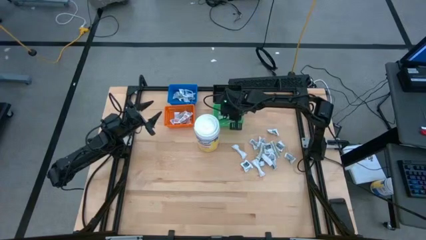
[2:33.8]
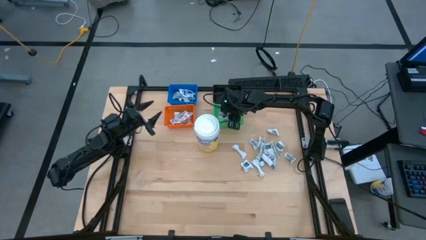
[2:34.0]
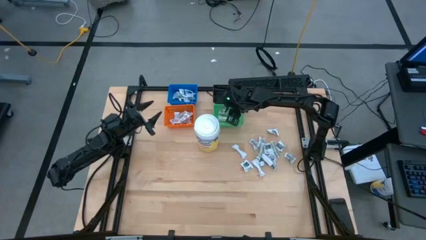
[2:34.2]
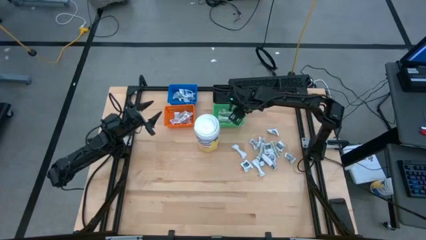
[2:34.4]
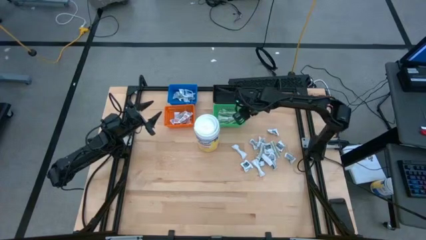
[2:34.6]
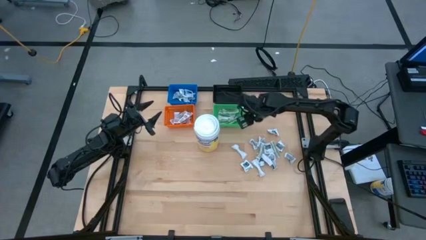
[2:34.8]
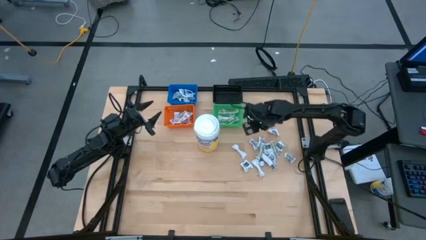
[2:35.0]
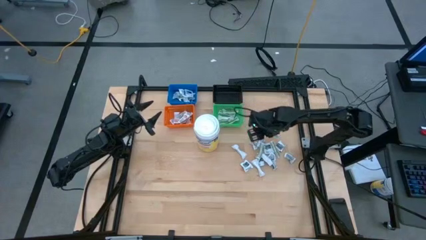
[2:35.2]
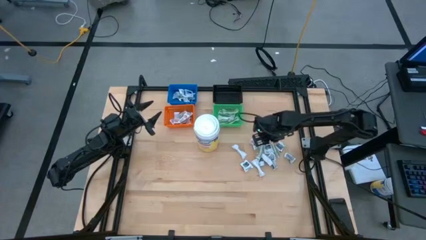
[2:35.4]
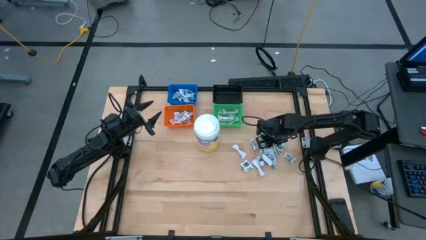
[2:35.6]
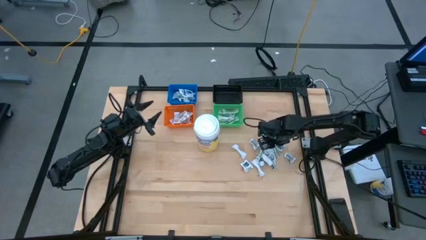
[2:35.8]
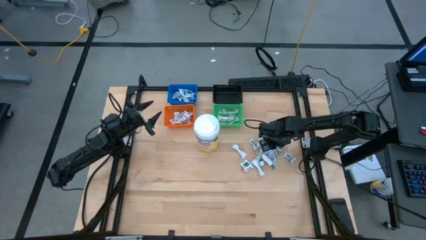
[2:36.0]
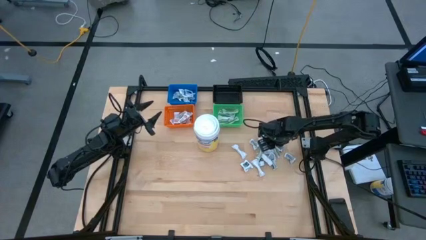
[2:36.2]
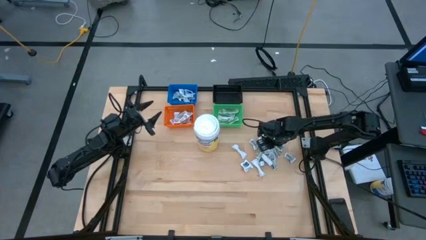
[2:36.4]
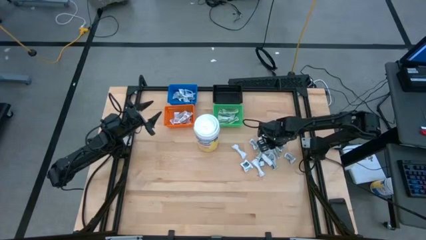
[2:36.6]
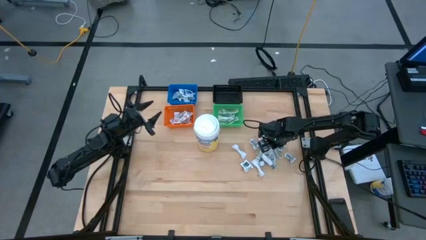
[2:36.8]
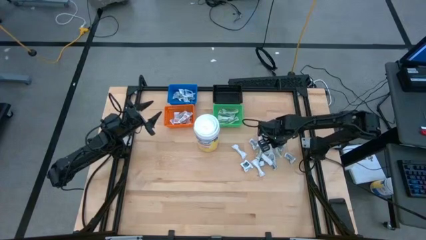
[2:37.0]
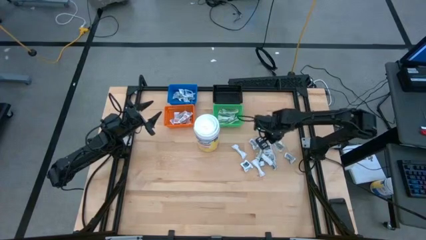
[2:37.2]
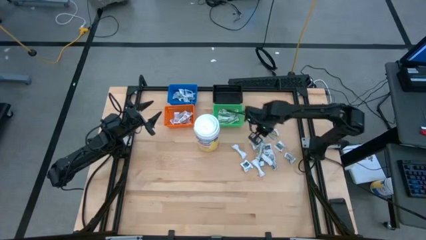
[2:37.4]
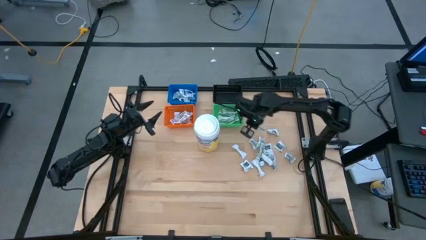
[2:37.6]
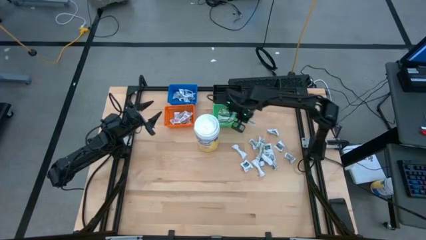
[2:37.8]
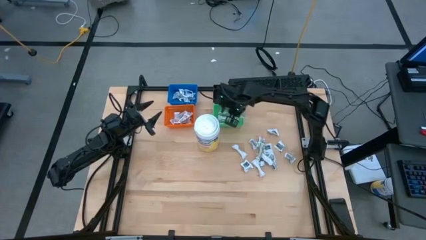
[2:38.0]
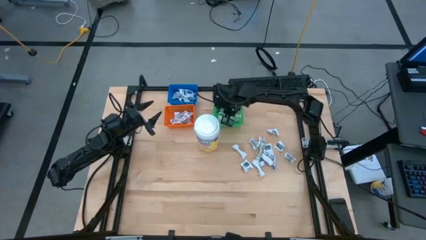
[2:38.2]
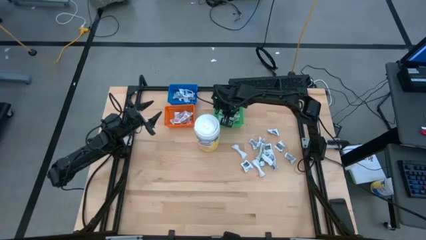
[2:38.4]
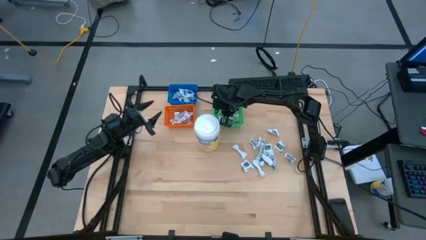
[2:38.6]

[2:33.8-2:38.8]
Task: Pick & Place First Aid Supplies
Put the green bandage into the green bin

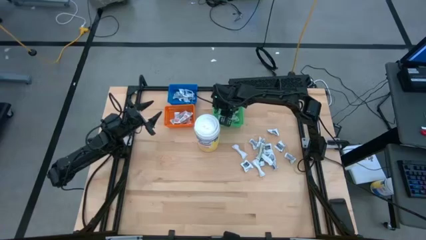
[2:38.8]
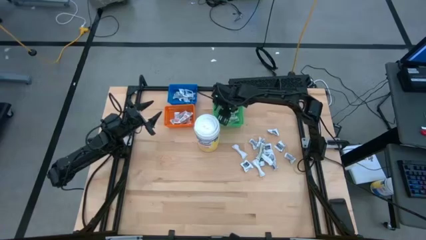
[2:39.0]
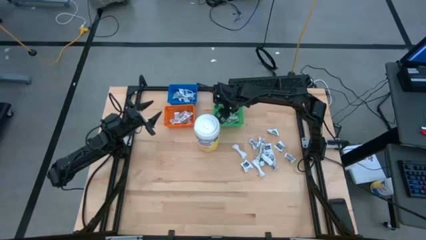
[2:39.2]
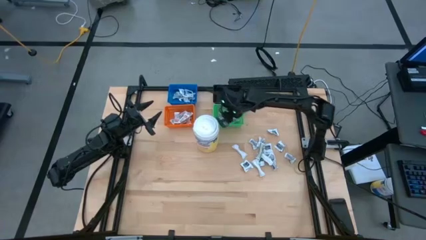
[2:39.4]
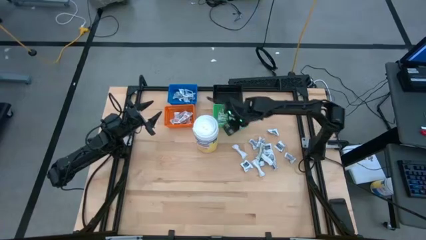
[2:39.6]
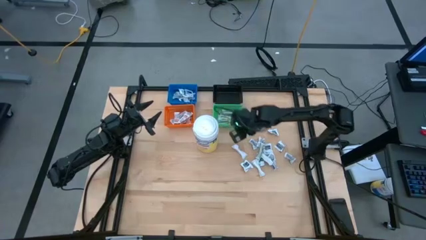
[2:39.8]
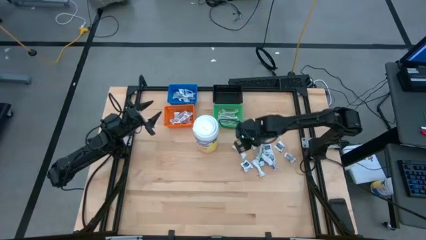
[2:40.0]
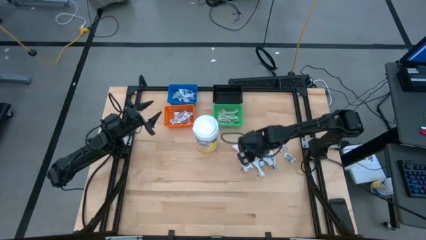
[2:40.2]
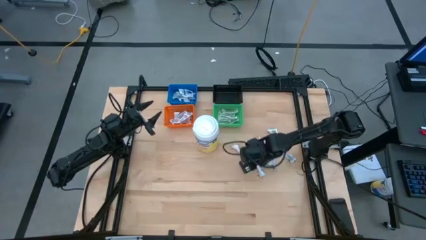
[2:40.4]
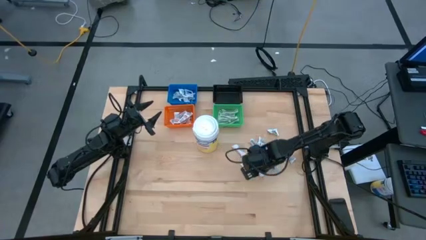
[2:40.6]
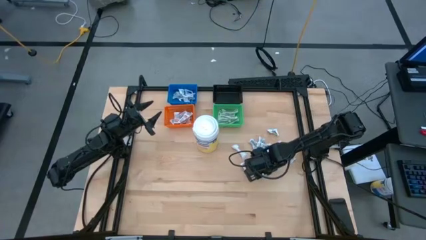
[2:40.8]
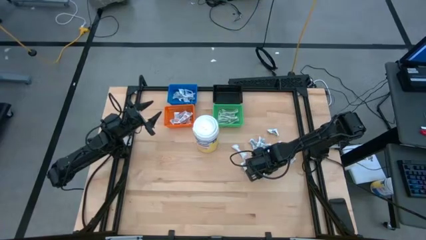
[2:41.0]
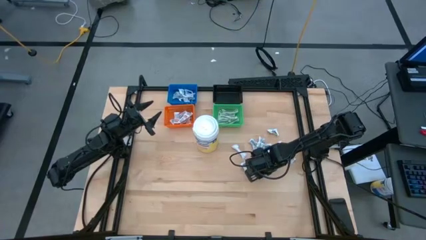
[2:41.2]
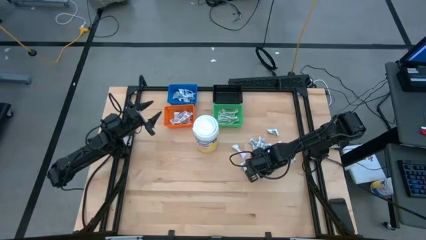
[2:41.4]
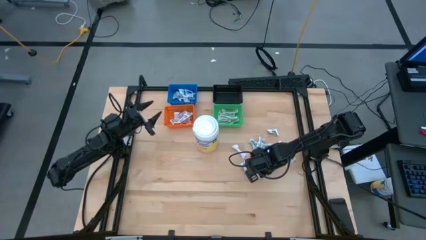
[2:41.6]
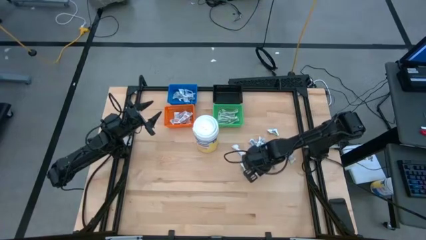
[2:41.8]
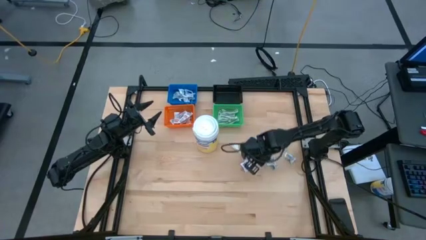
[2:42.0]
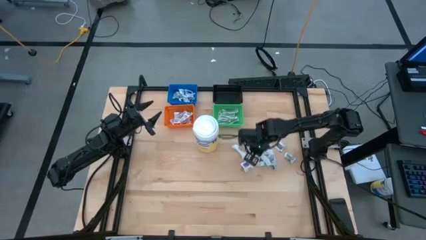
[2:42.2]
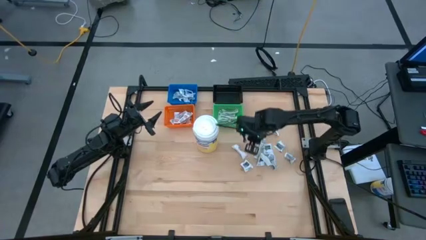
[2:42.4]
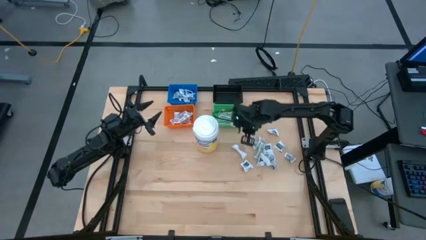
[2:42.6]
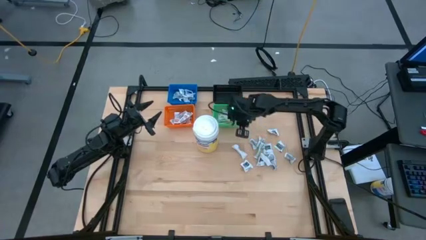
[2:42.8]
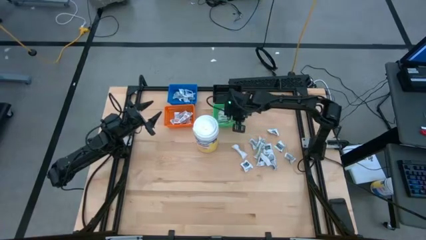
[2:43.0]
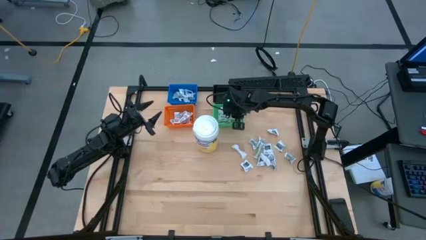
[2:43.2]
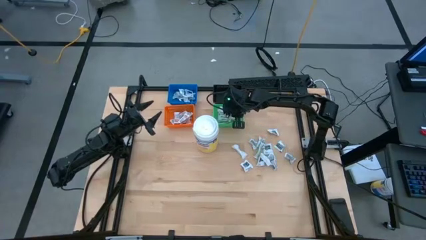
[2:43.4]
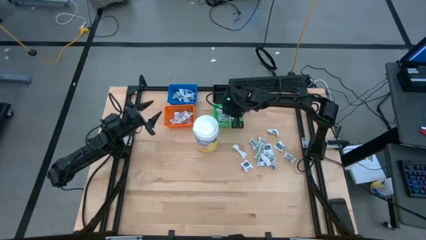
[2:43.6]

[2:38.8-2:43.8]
Put the green bandage into the green bin

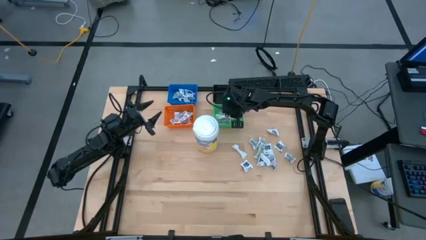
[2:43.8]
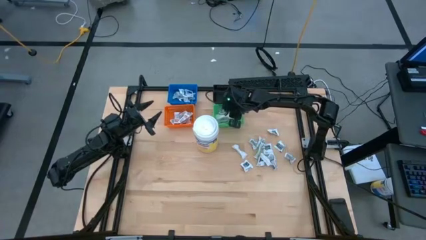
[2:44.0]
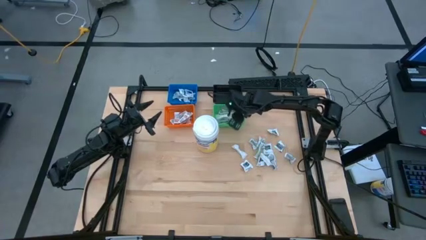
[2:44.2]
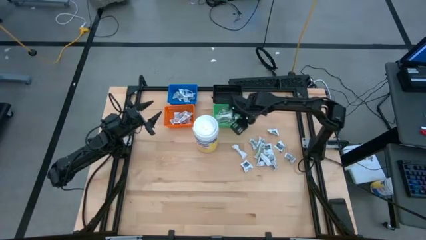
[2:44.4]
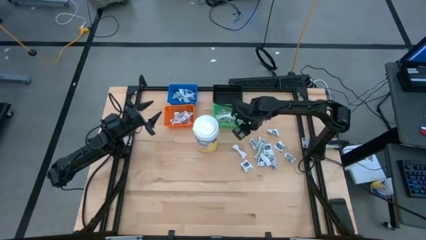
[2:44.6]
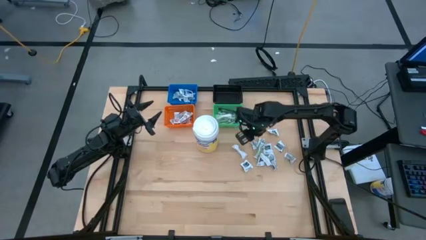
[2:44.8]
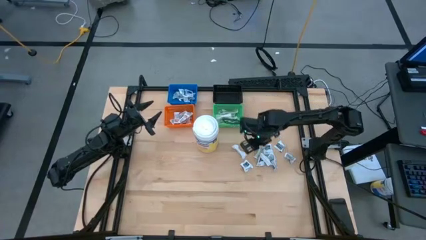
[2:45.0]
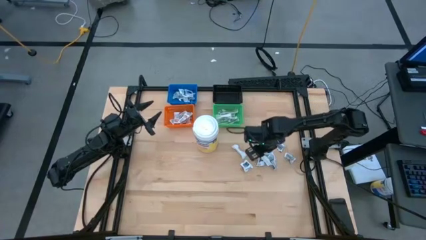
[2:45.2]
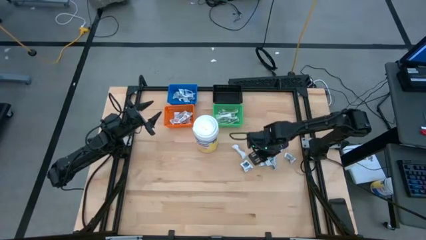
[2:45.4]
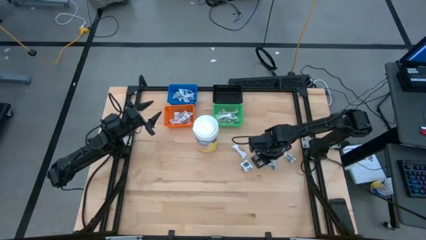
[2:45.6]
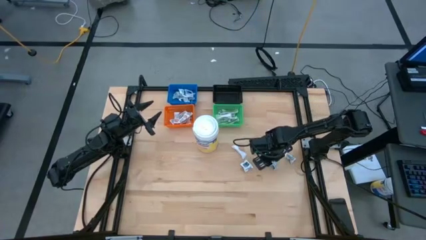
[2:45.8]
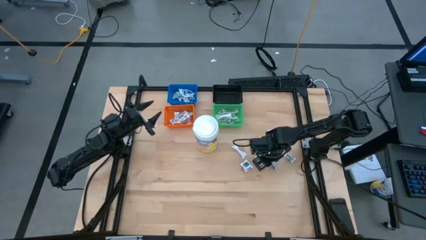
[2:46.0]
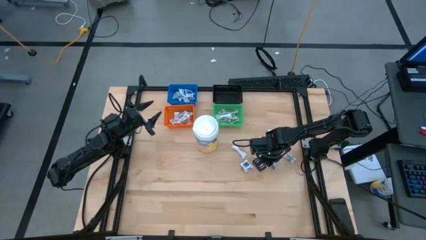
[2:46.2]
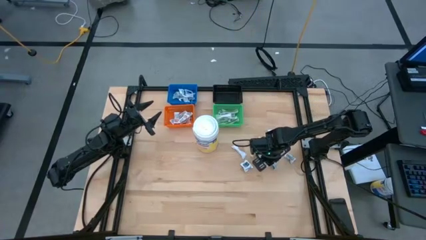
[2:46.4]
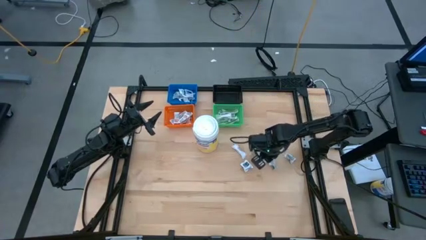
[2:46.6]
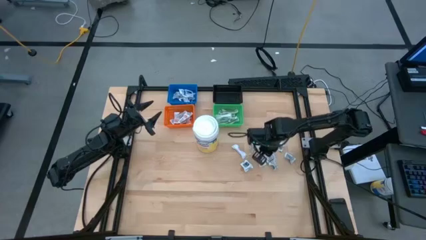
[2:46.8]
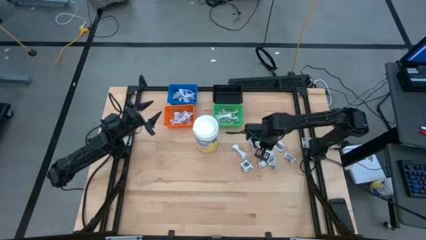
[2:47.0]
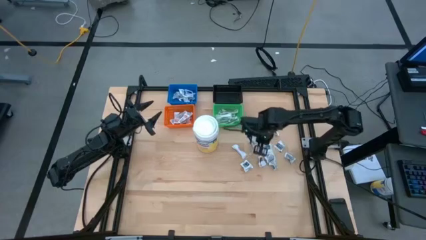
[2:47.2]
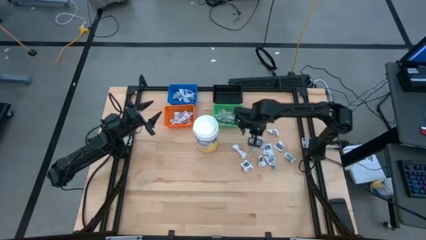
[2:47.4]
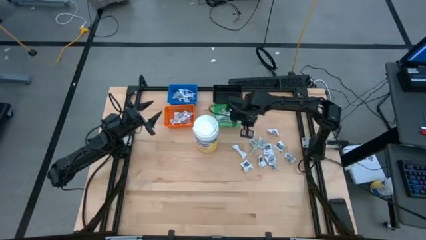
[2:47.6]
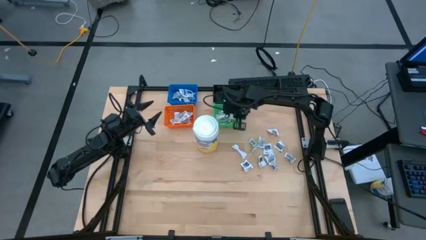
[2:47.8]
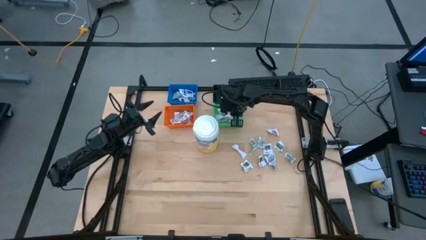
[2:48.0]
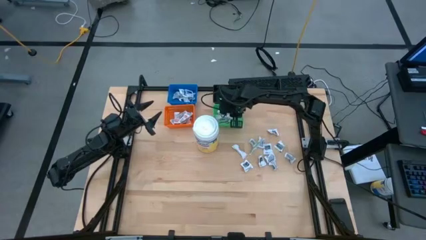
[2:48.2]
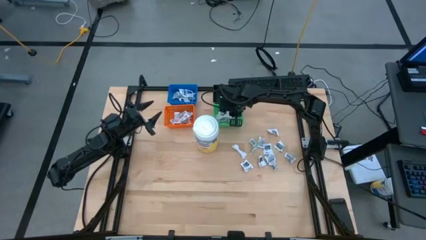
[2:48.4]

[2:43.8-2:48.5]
Put the green bandage into the green bin

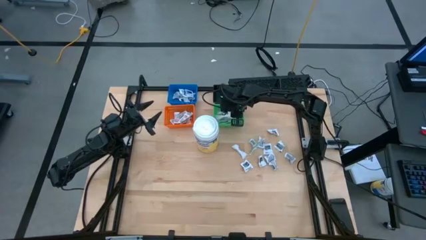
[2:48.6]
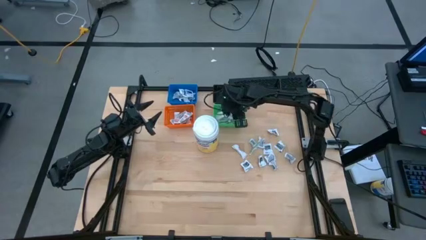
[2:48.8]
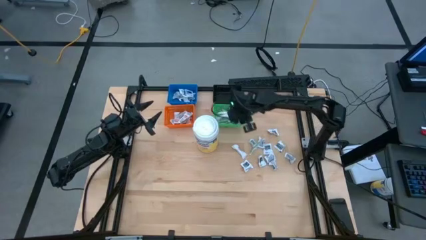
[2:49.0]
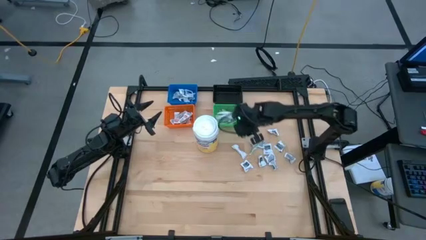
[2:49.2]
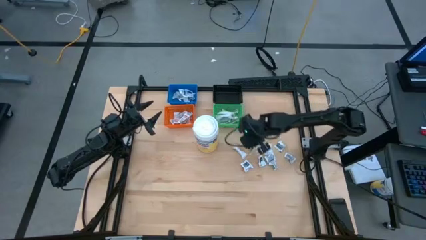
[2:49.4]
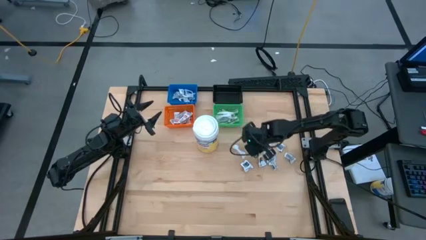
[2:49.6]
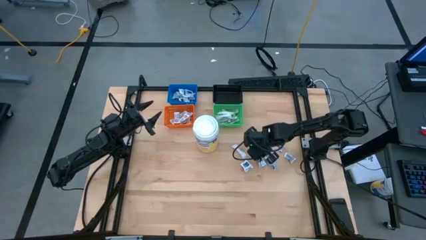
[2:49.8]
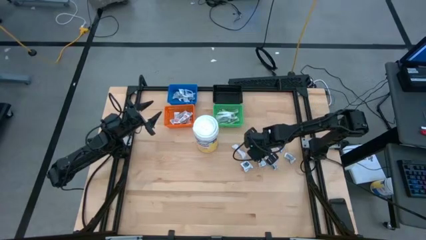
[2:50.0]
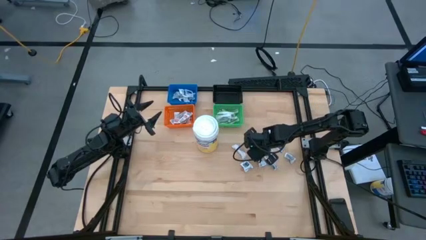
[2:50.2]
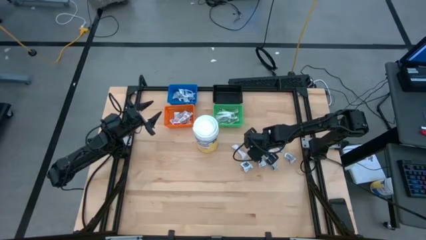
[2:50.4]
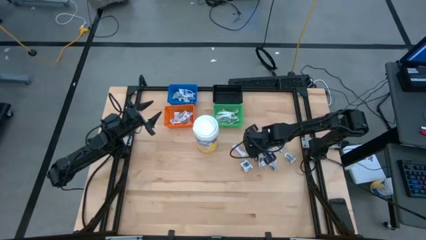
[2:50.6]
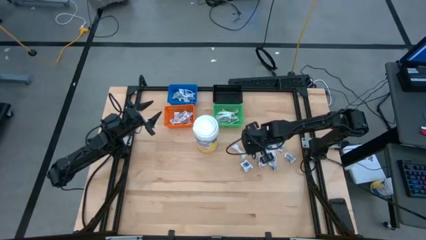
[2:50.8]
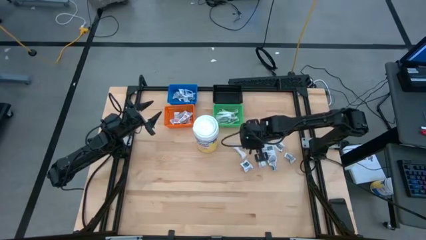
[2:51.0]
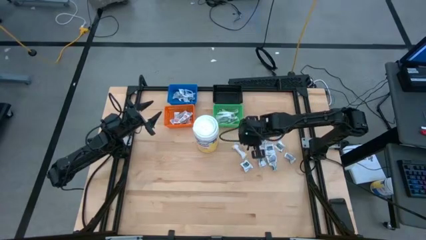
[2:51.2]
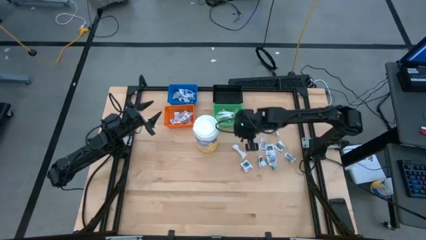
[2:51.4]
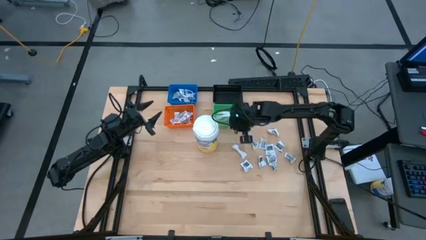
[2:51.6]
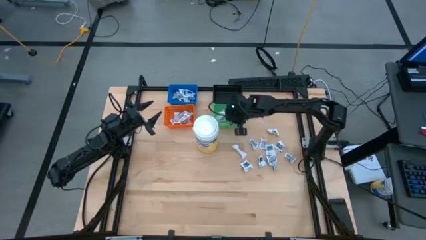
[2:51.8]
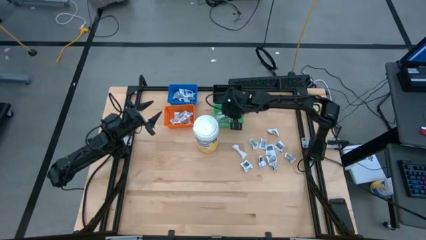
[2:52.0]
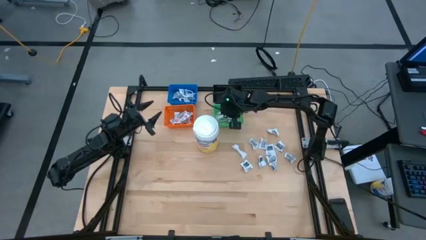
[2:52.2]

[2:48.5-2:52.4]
Put the green bandage into the green bin
